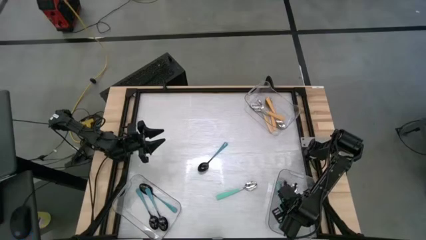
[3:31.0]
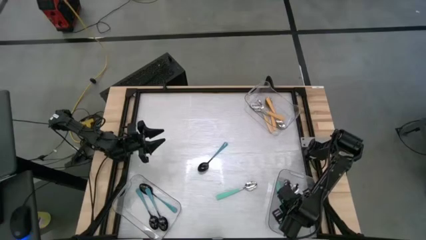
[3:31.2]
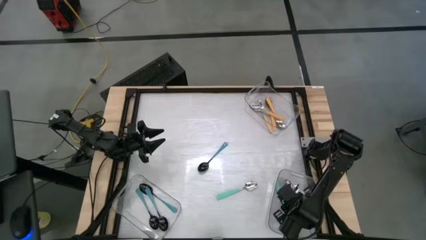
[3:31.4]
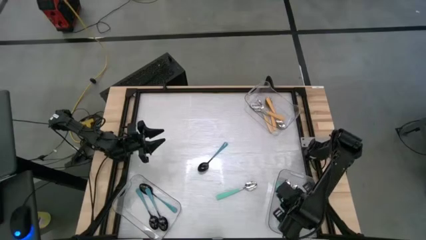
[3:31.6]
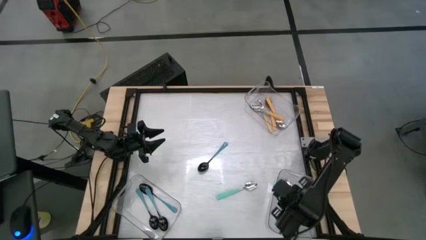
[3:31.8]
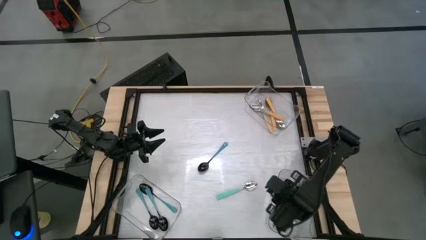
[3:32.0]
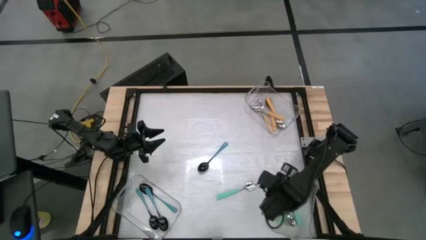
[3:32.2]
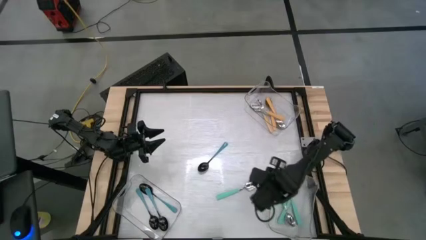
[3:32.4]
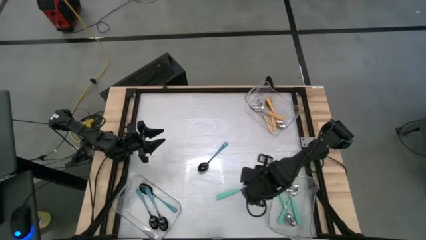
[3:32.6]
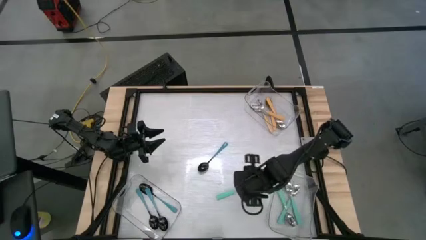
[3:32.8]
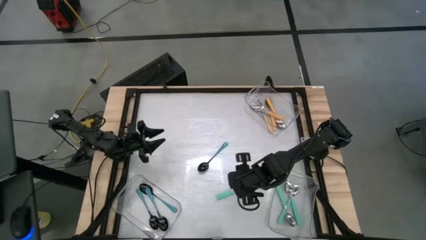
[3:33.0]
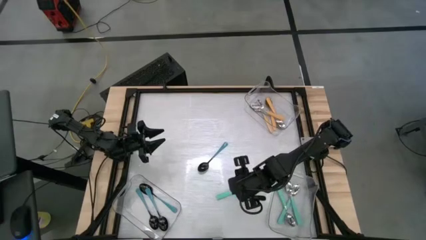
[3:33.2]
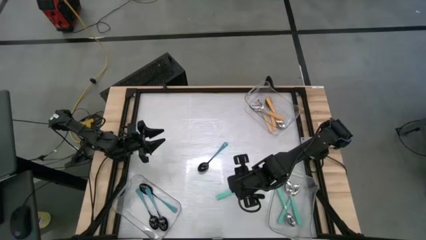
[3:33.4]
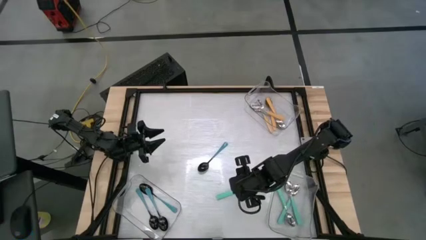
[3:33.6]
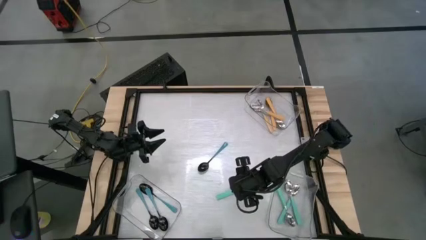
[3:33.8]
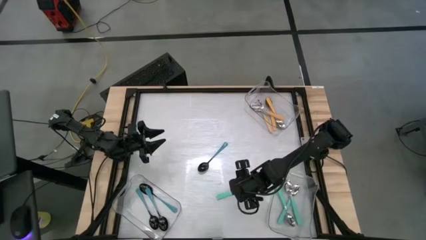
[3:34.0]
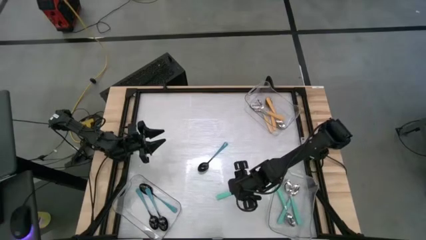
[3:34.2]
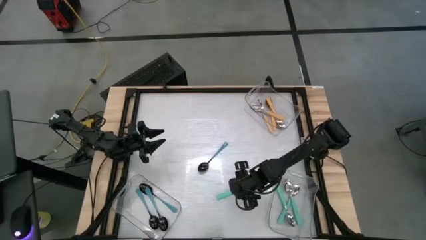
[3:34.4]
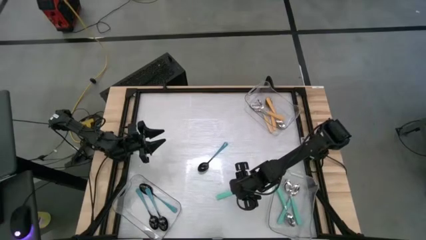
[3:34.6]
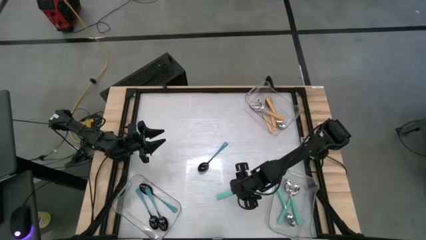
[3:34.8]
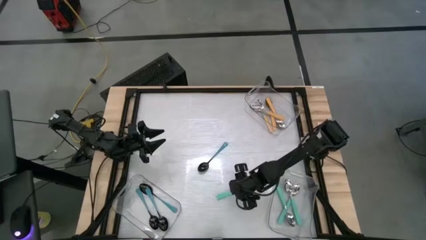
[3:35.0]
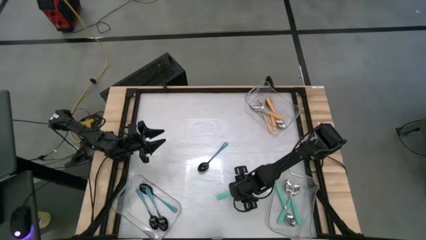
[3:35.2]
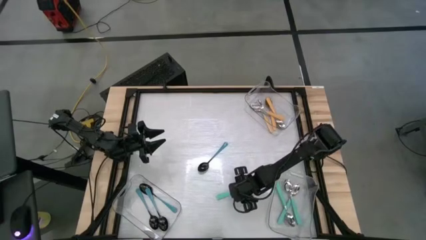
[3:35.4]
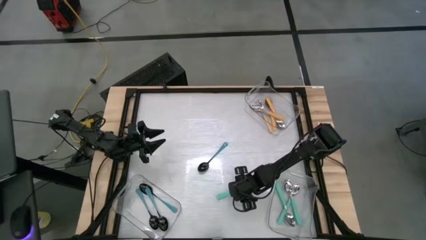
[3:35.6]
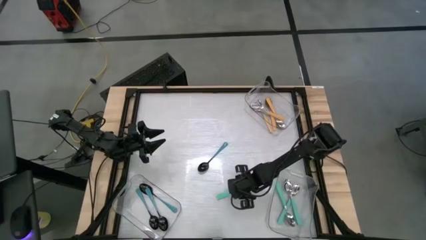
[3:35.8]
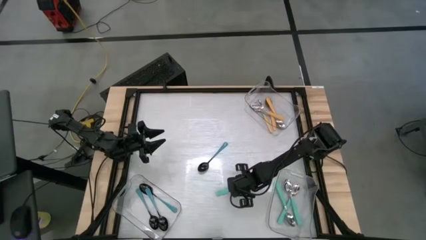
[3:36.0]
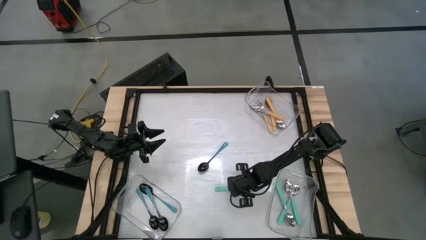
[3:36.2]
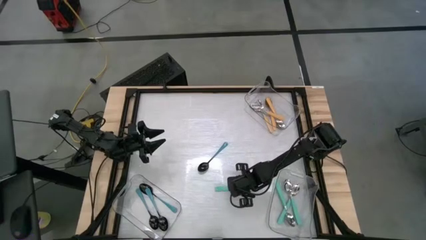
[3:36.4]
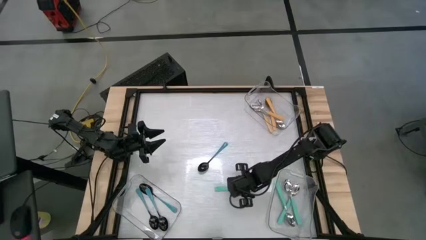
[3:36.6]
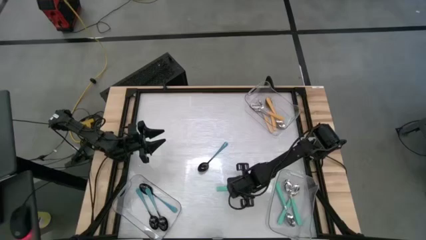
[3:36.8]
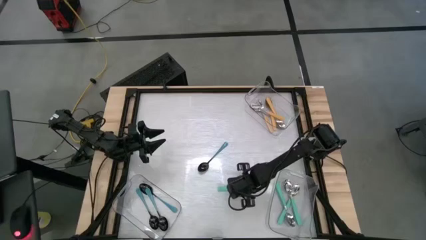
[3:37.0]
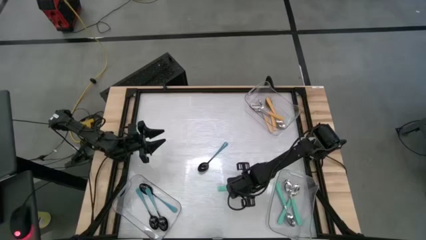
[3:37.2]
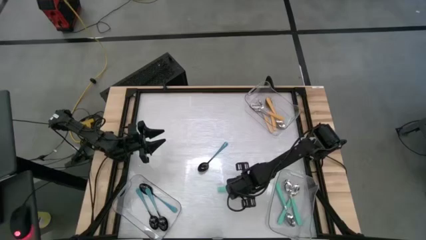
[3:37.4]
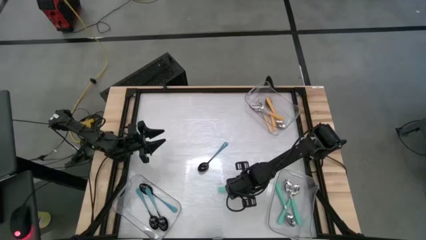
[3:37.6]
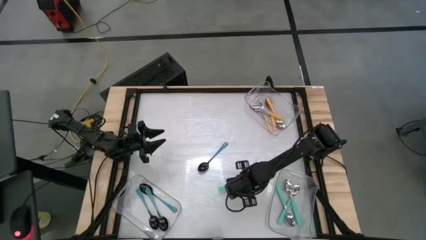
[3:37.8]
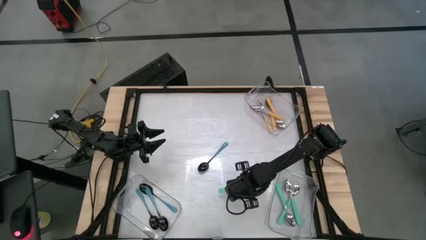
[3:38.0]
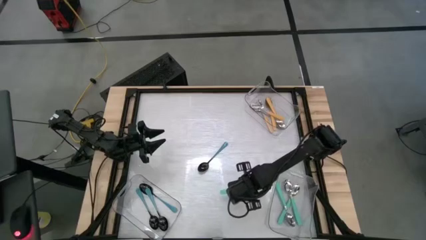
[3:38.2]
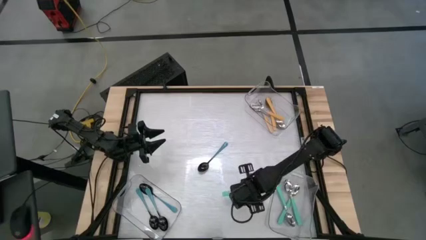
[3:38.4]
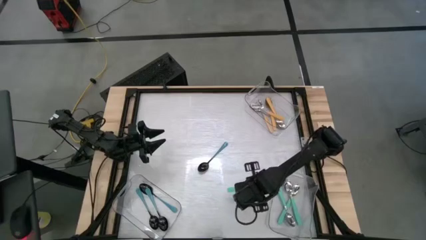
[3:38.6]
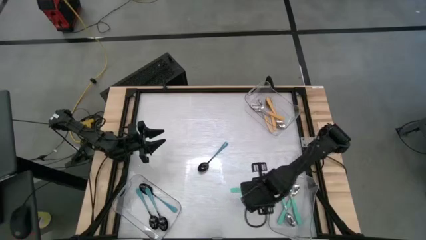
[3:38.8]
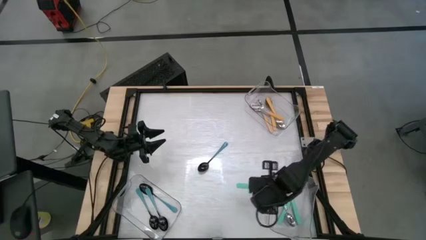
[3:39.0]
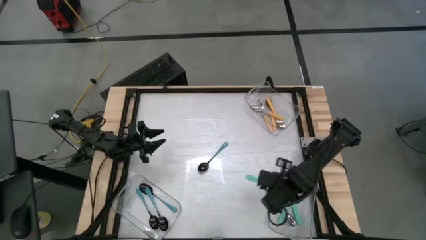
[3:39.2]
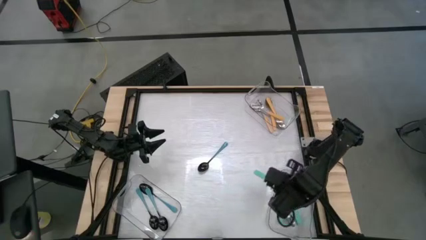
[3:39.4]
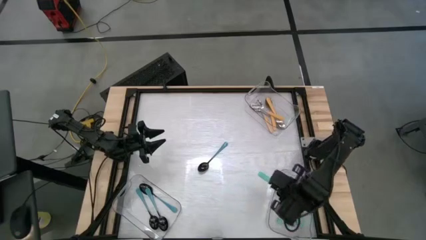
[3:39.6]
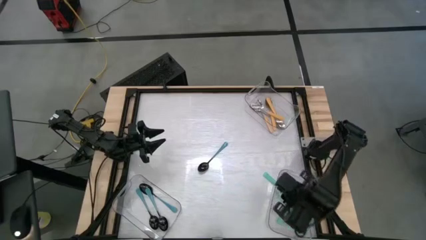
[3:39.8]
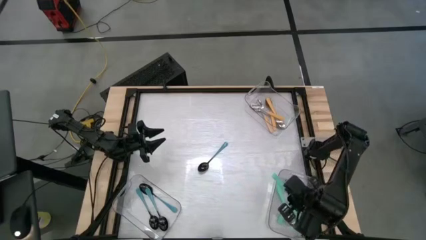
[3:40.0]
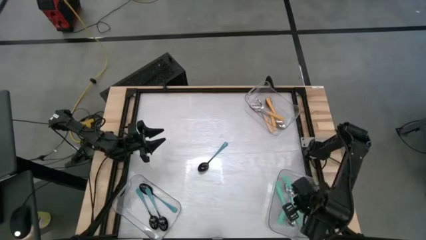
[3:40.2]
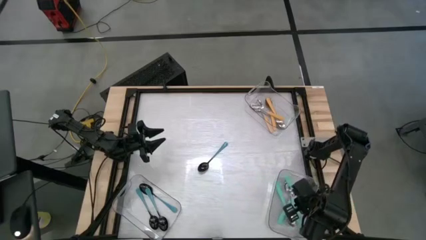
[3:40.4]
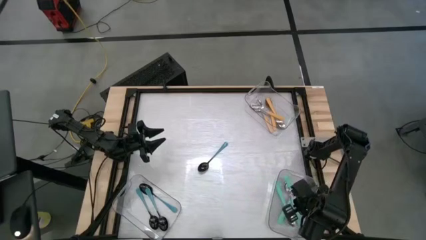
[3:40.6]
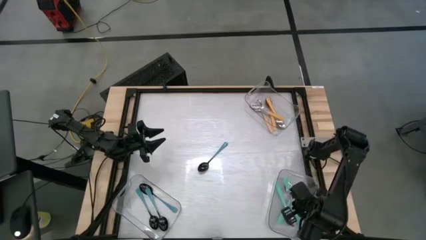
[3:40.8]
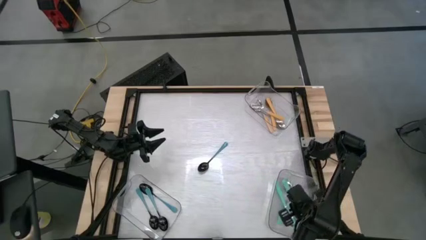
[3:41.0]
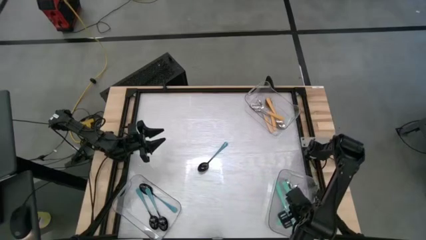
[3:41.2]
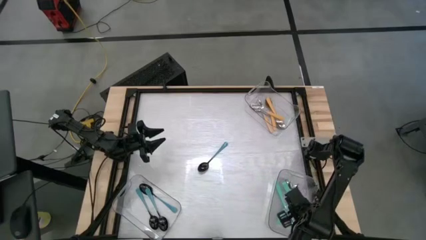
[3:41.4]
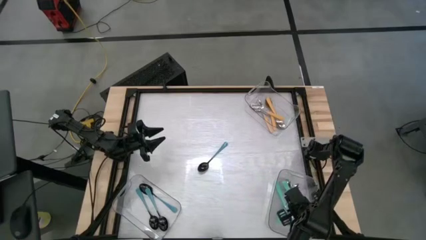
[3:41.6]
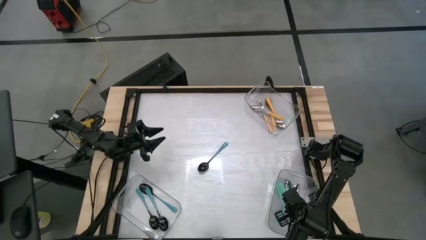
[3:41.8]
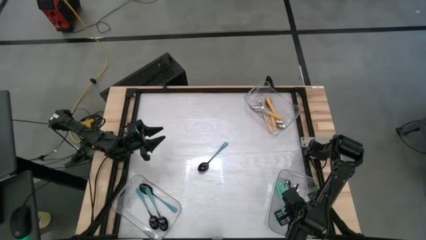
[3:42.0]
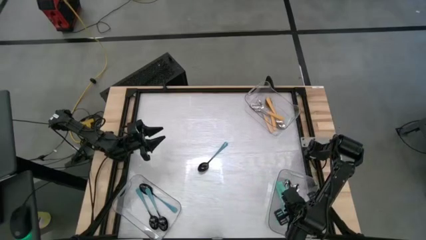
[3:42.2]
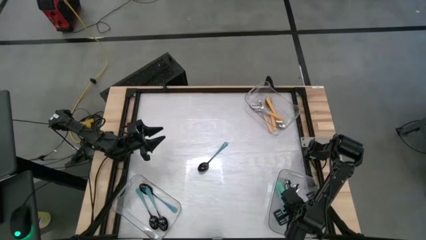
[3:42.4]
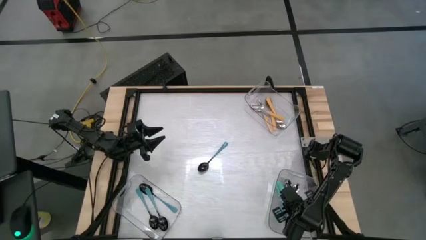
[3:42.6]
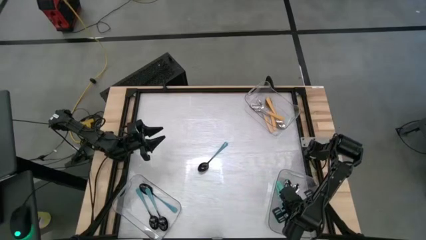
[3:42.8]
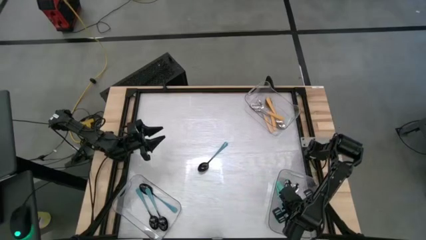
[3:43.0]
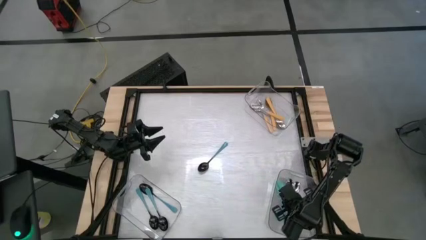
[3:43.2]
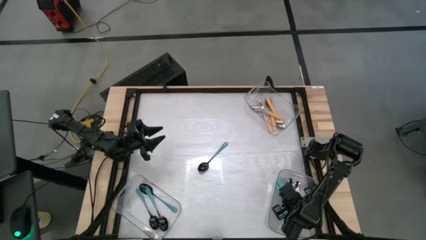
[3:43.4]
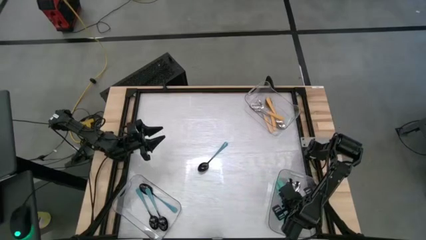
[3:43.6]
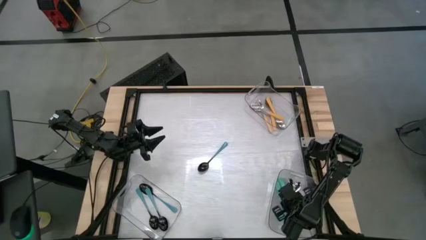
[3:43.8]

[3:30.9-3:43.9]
Task: Sort silverware by color (type)
Put the green spoon into the bottom right transparent bin
